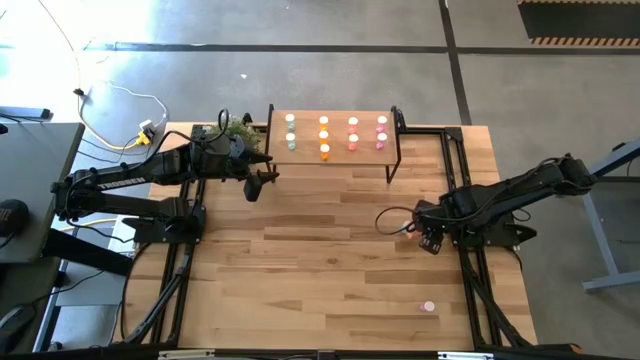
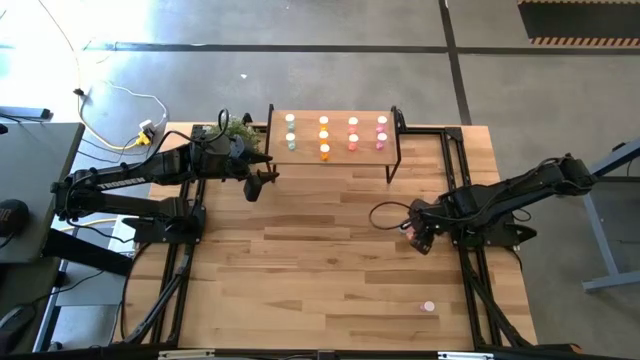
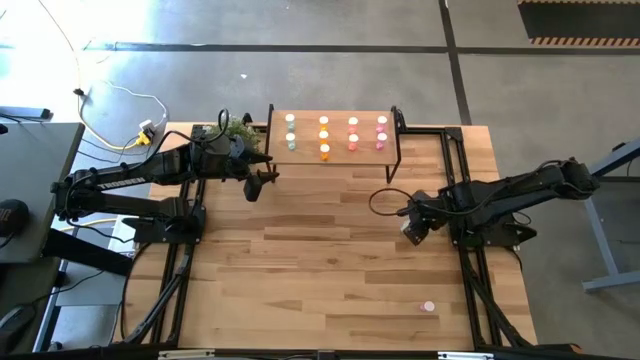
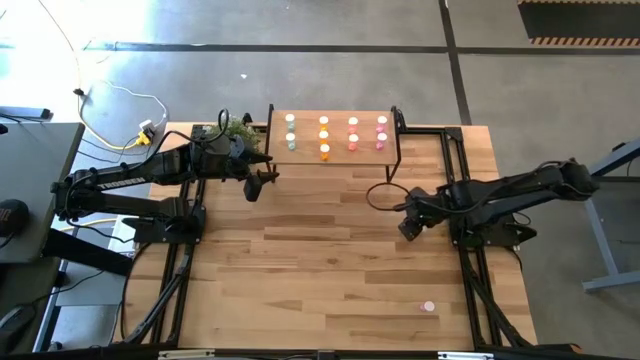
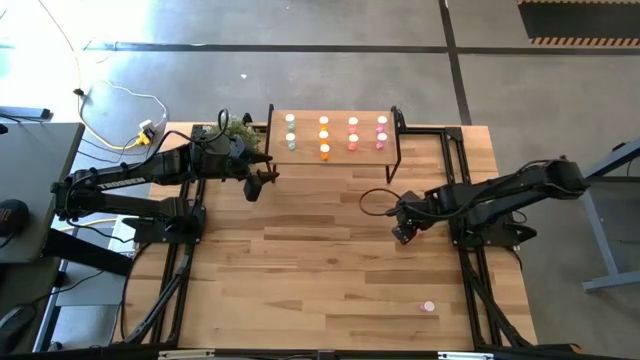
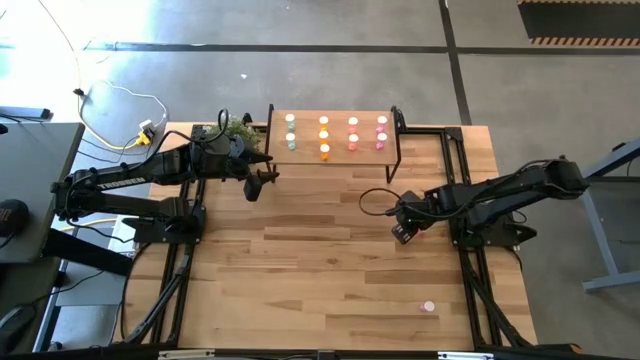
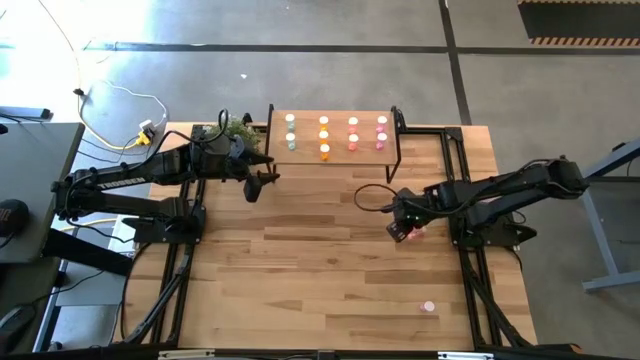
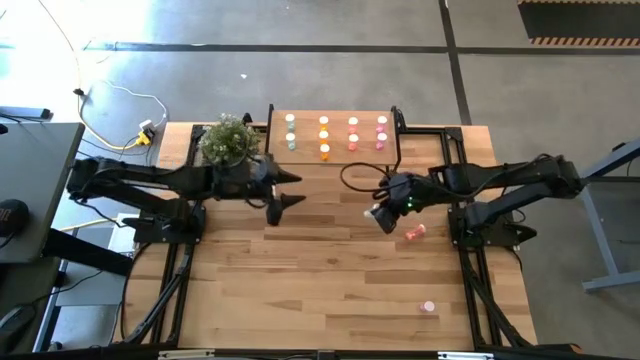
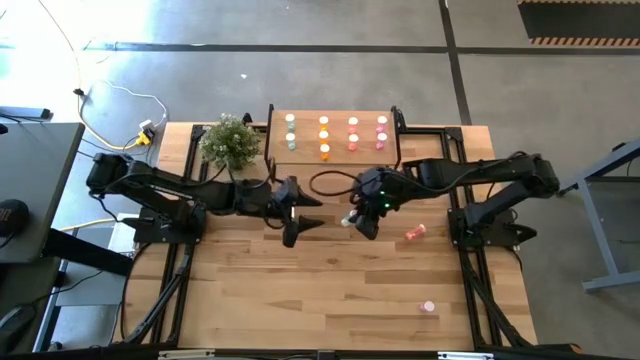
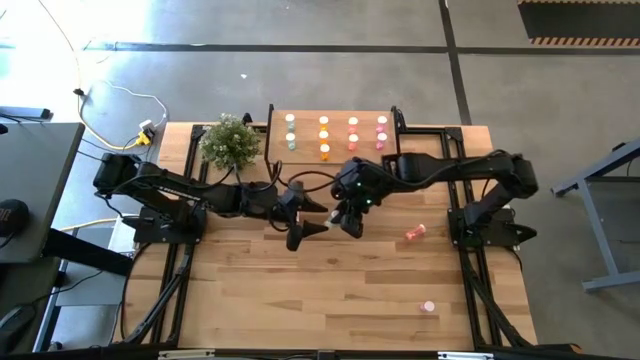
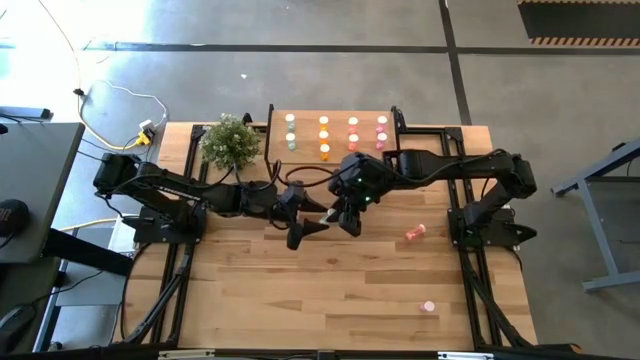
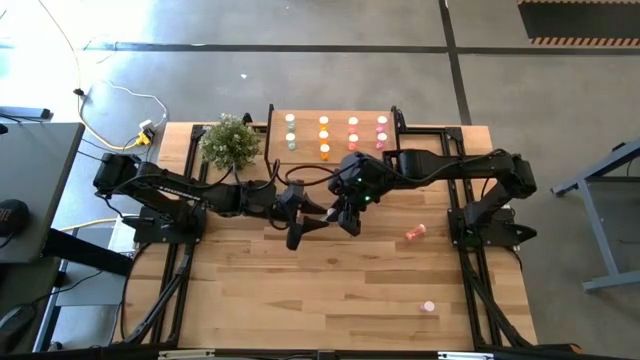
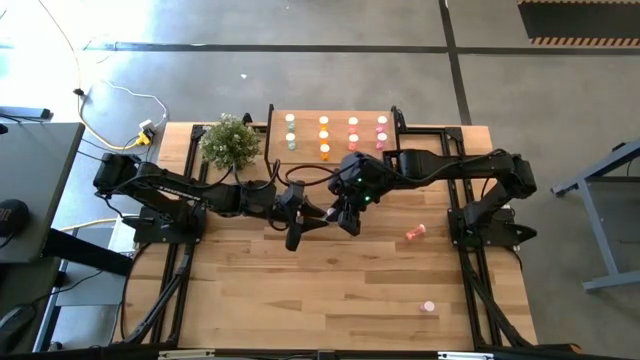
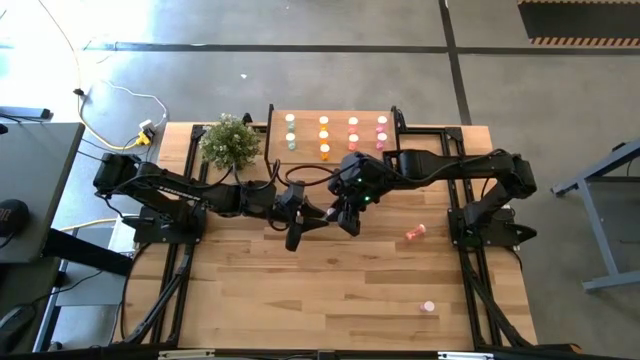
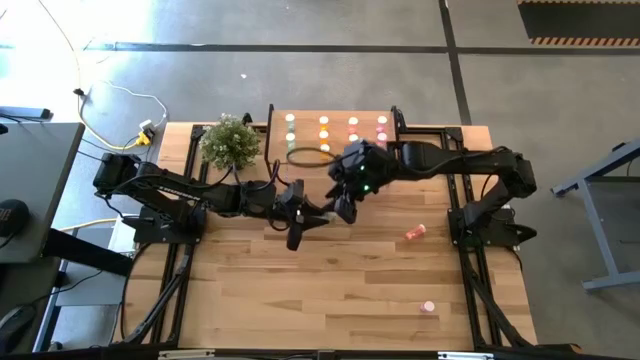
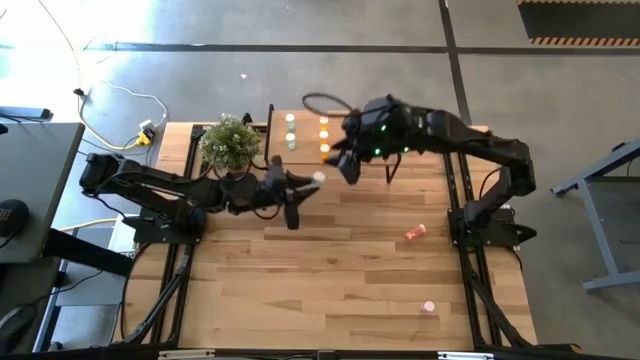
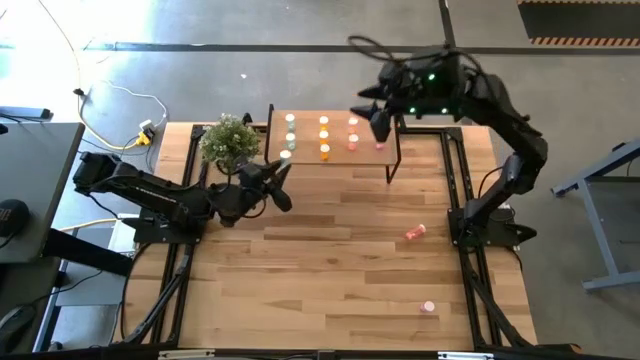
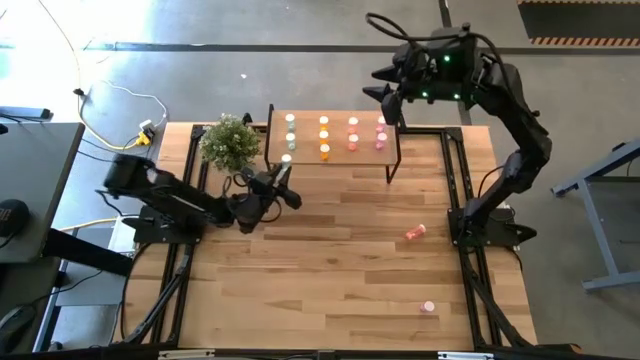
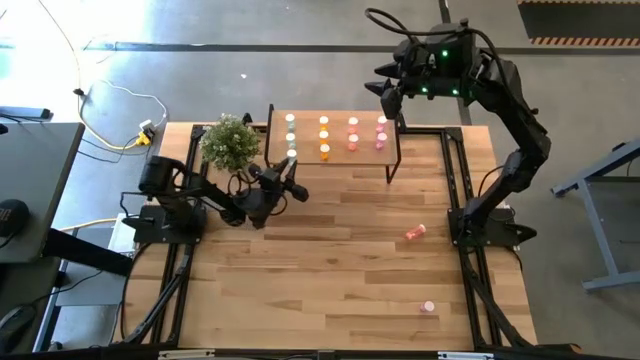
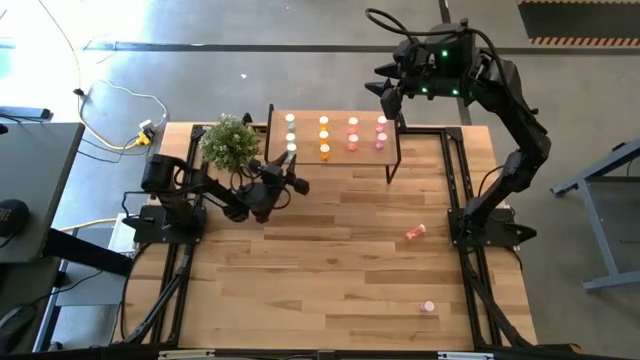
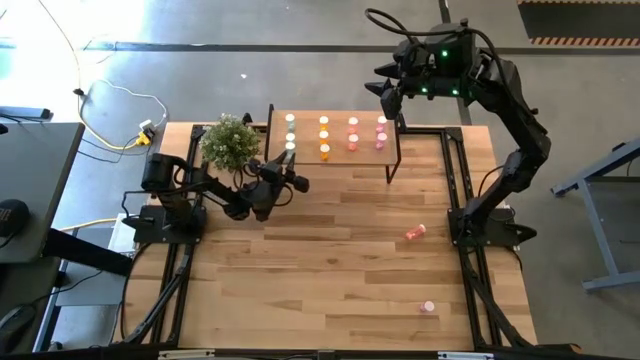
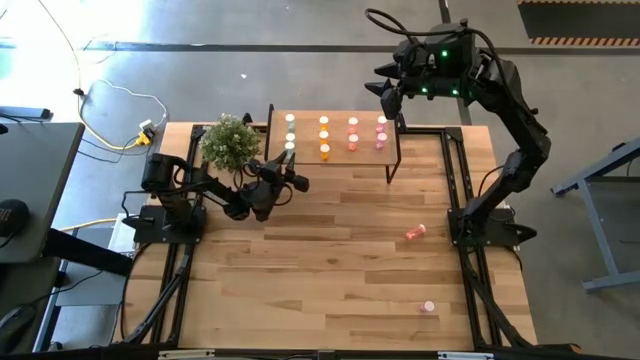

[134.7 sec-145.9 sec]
Task: Pick and place medicine bottles onto shelf by color
Put the blue pill bottle on the shelf aligned with the other blue pill bottles

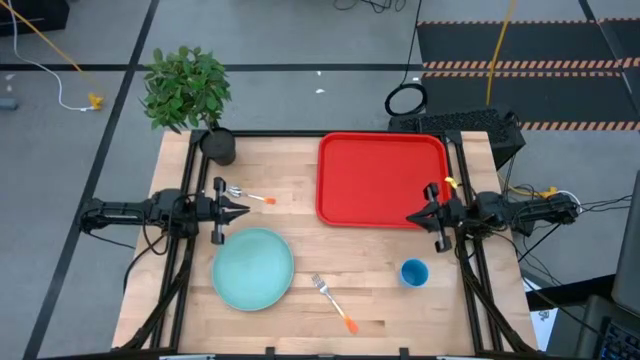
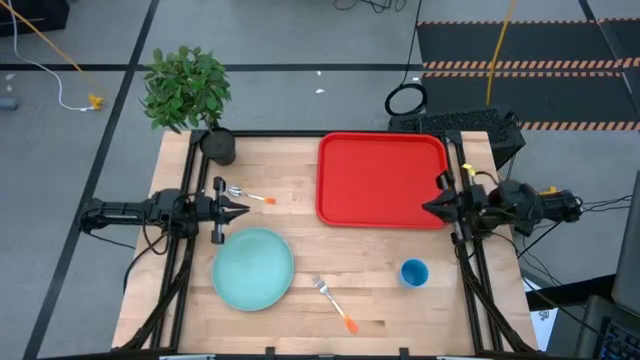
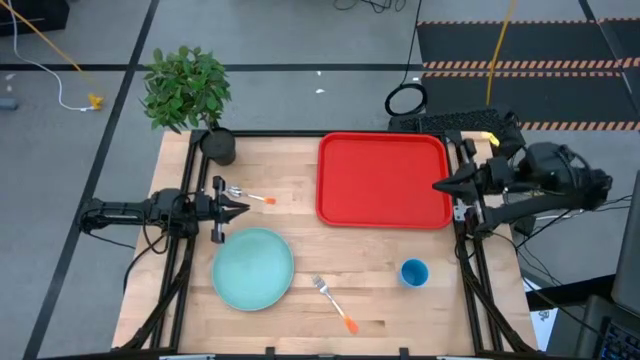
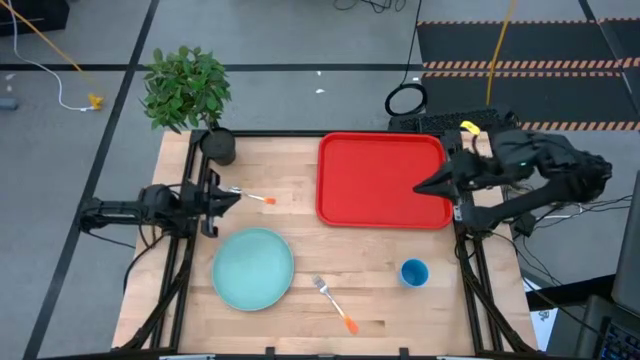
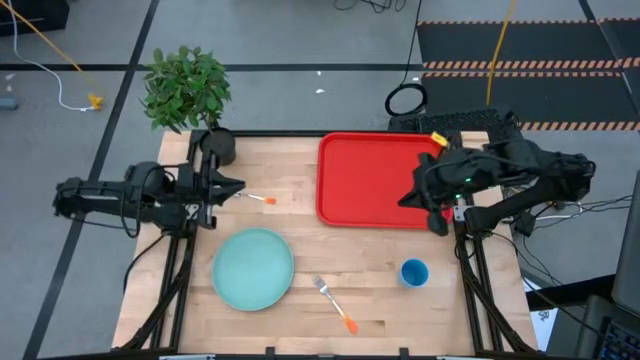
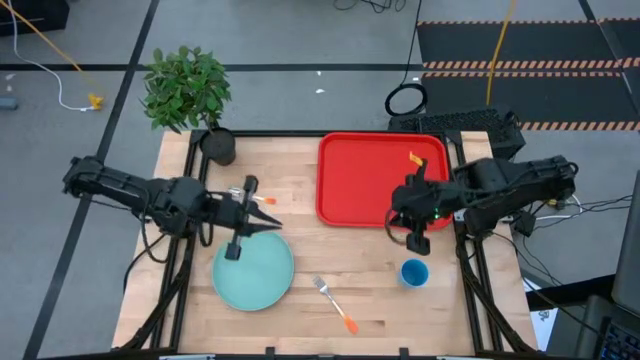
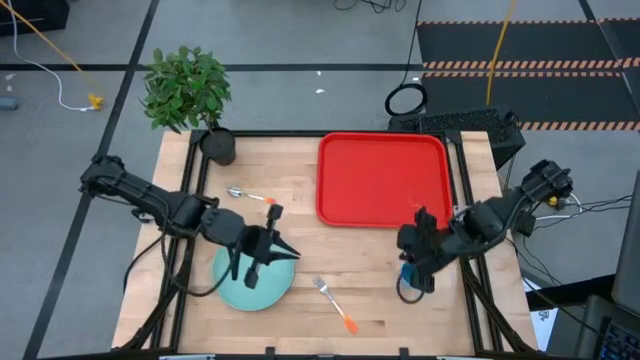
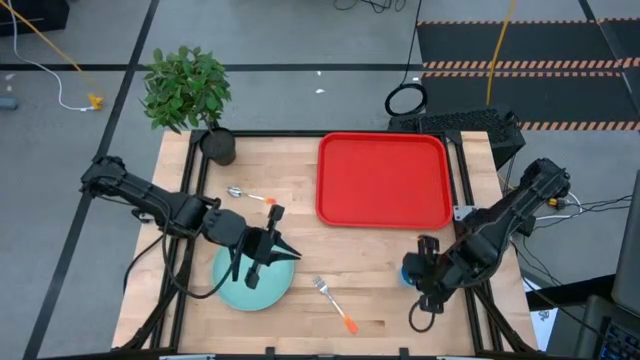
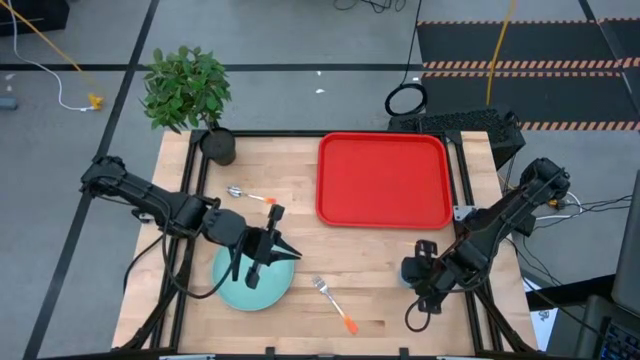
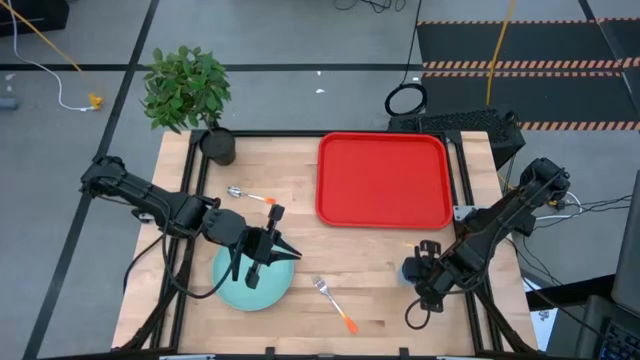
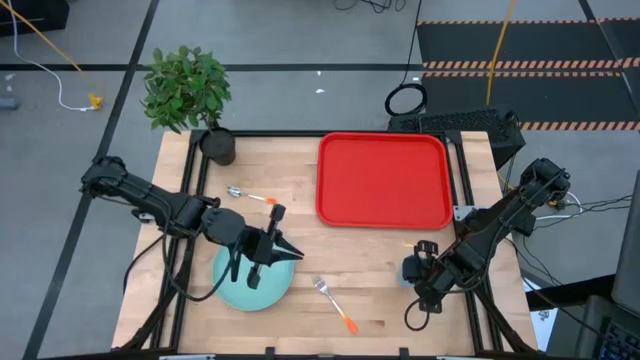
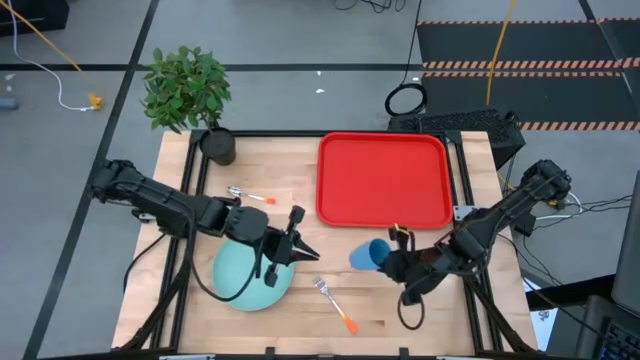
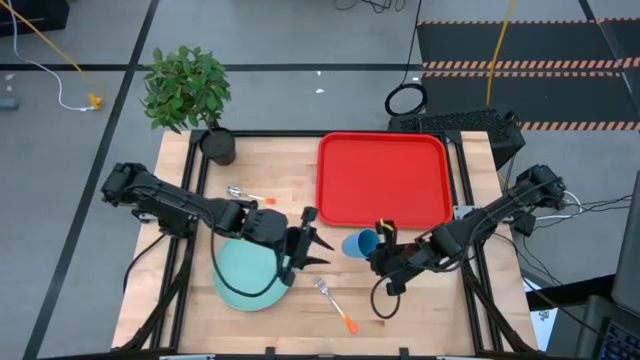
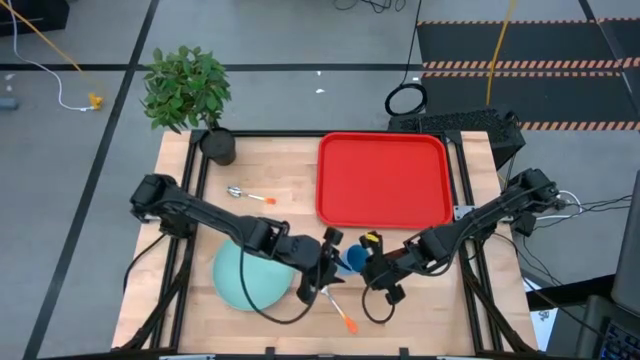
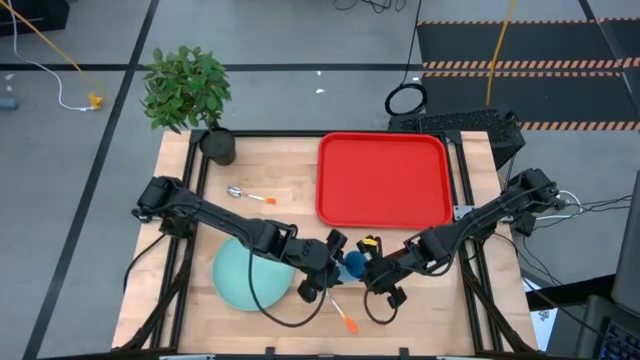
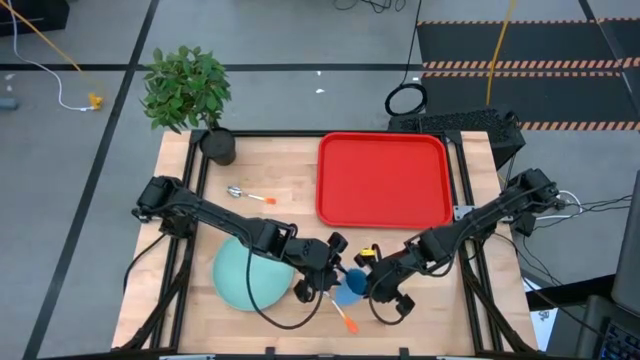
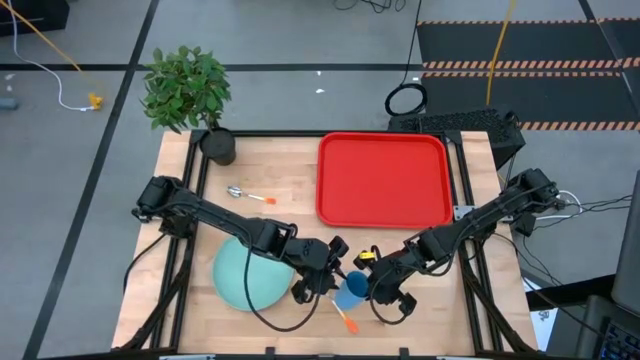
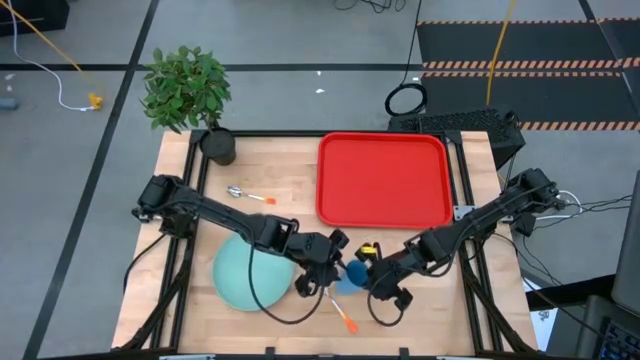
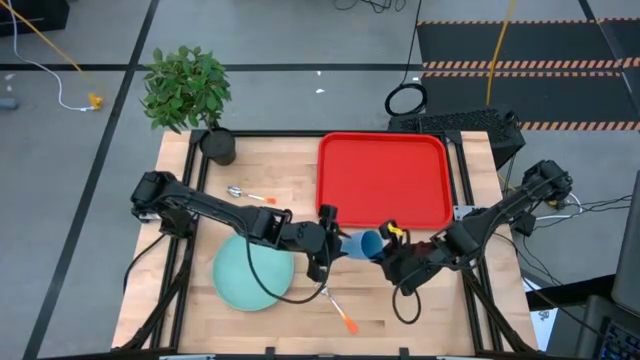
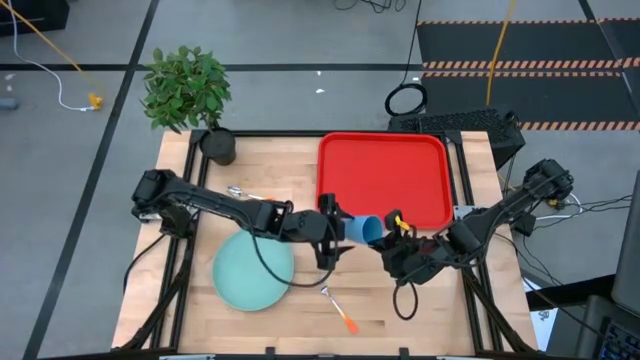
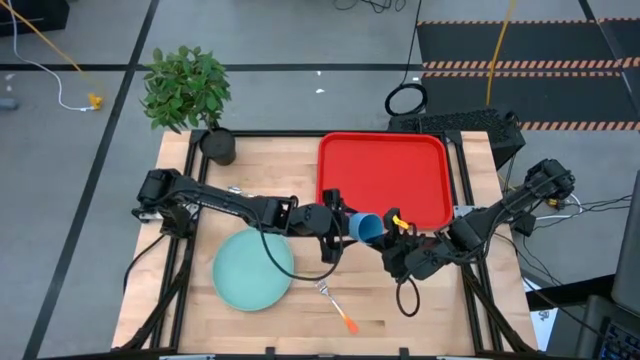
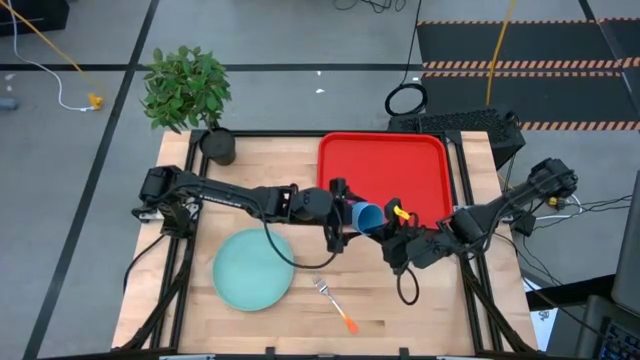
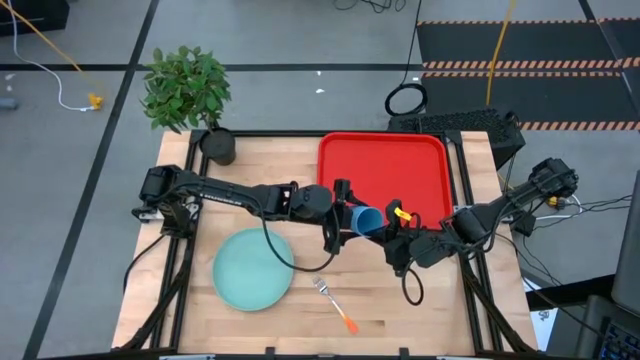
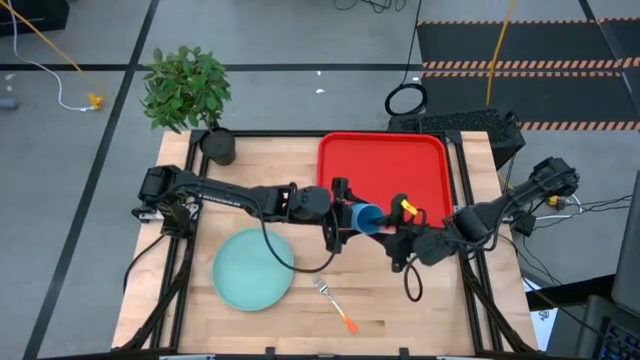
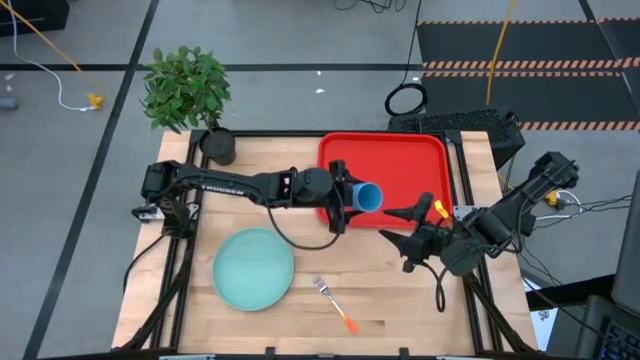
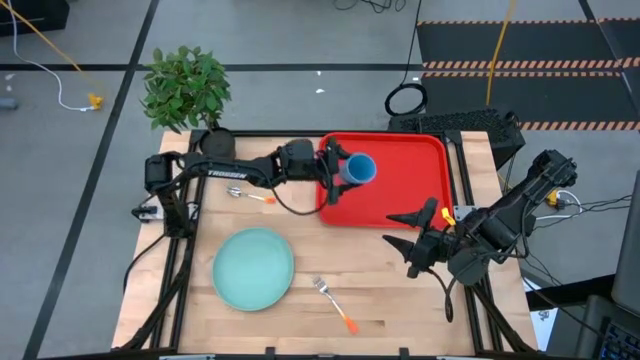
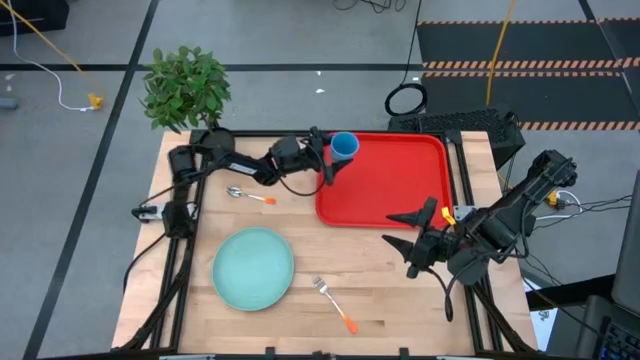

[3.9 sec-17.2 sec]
Task: Pick and place plate/cup/fork/spoon on tray
Put the blue cup on the red tray
